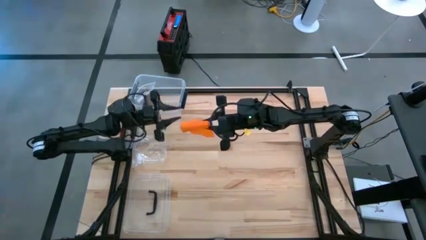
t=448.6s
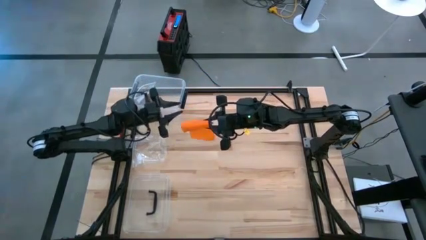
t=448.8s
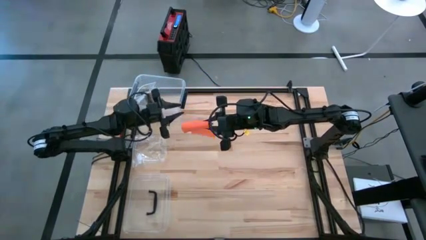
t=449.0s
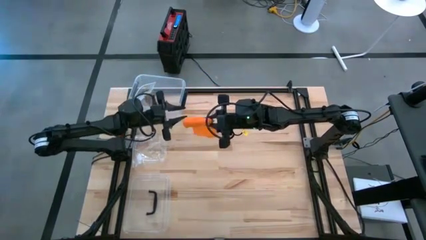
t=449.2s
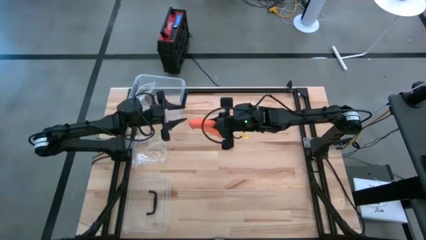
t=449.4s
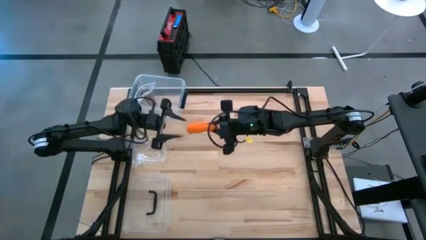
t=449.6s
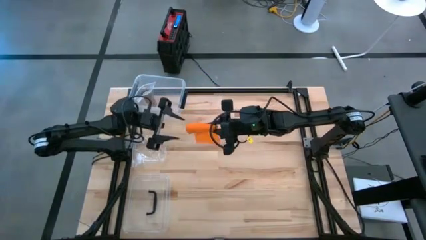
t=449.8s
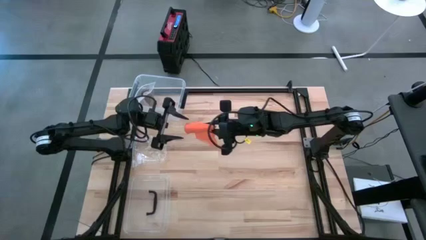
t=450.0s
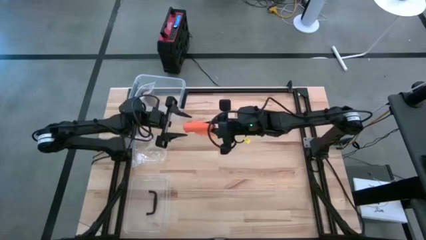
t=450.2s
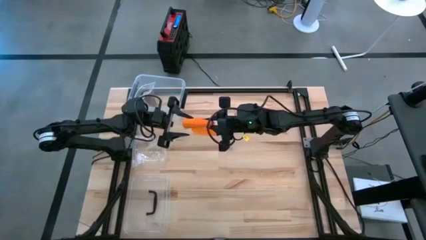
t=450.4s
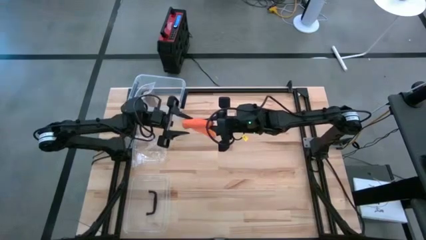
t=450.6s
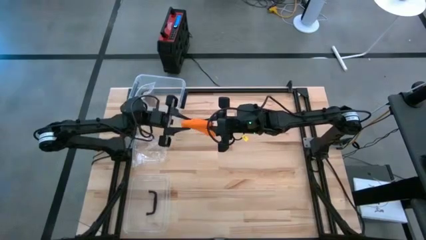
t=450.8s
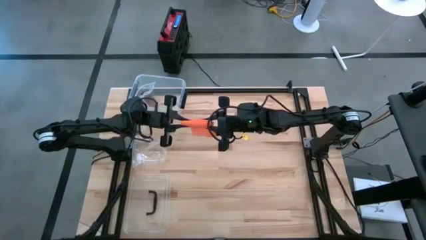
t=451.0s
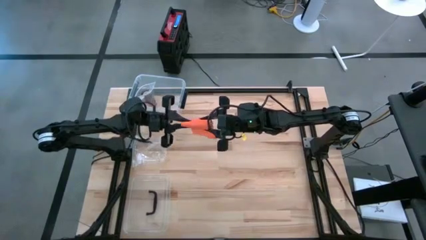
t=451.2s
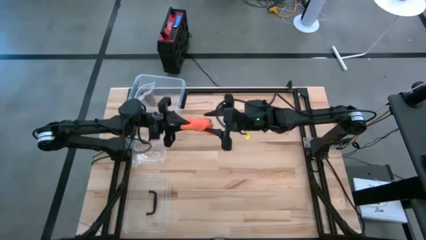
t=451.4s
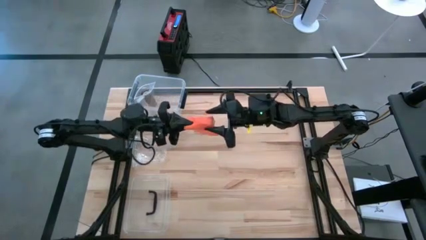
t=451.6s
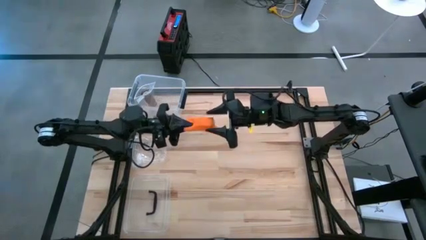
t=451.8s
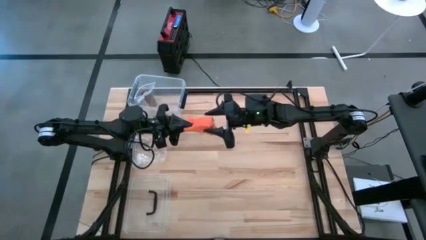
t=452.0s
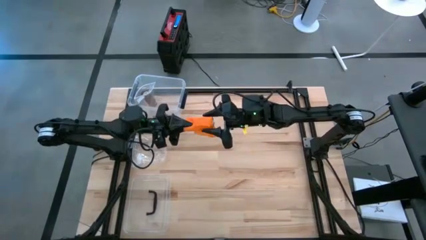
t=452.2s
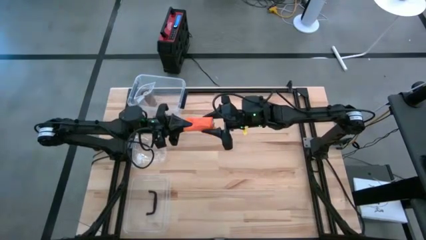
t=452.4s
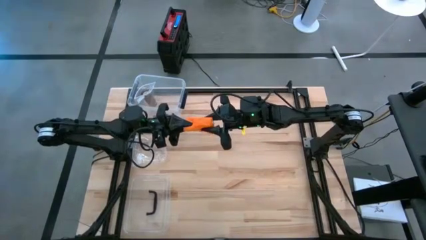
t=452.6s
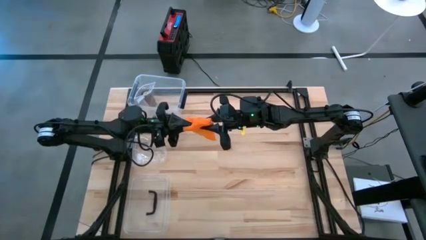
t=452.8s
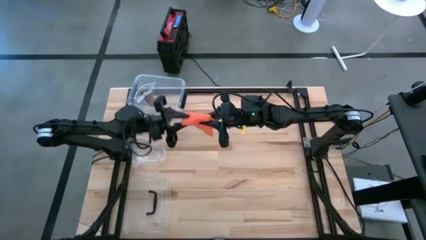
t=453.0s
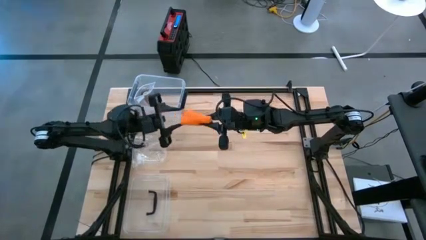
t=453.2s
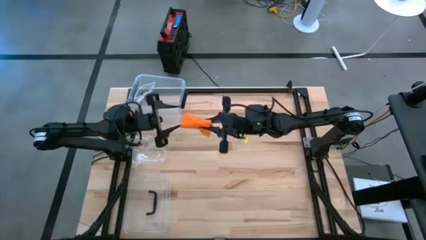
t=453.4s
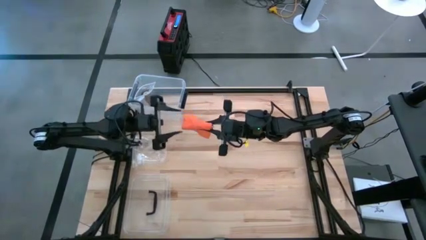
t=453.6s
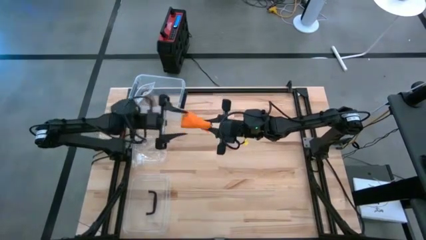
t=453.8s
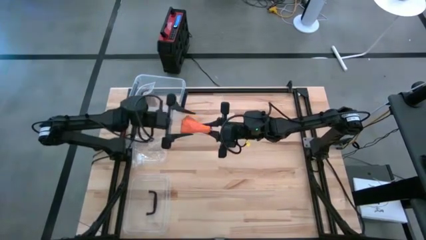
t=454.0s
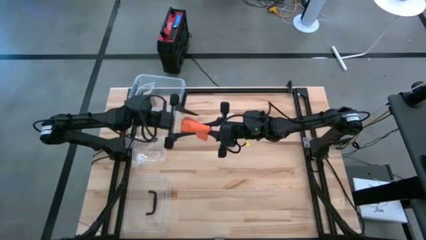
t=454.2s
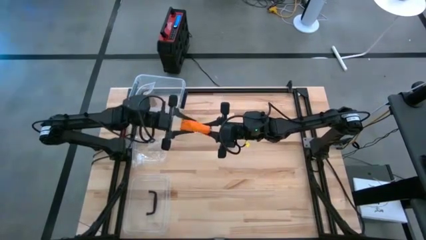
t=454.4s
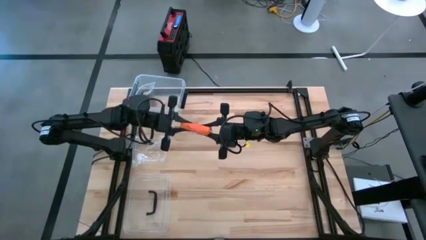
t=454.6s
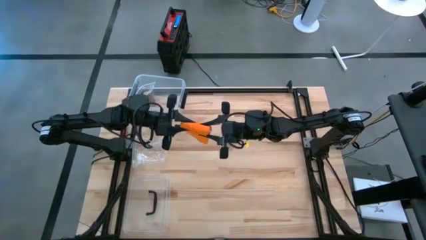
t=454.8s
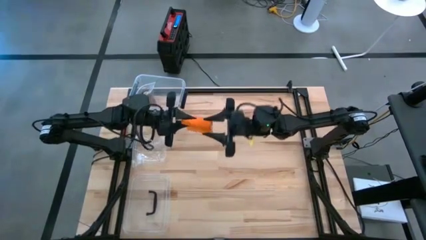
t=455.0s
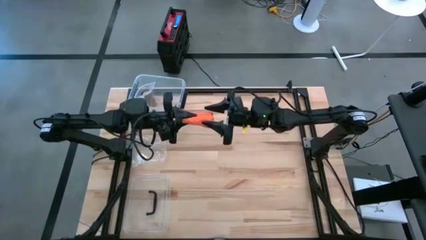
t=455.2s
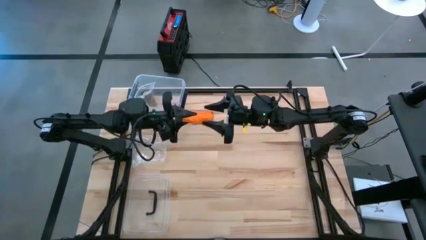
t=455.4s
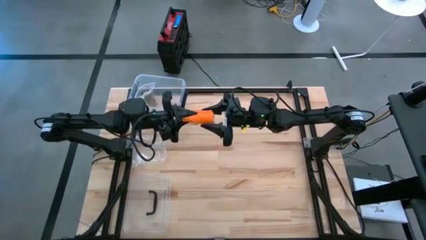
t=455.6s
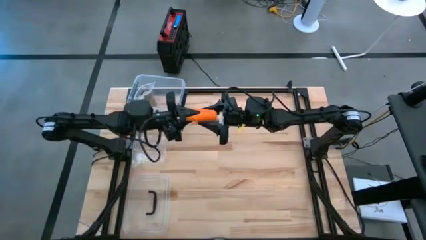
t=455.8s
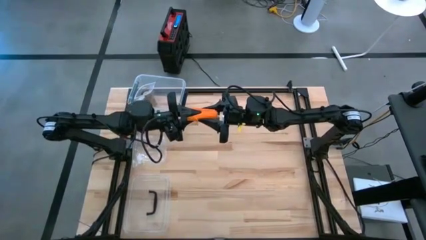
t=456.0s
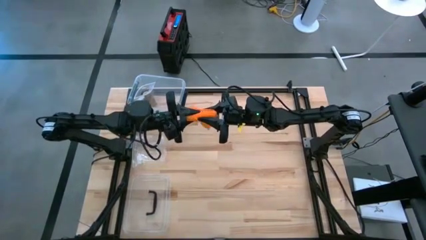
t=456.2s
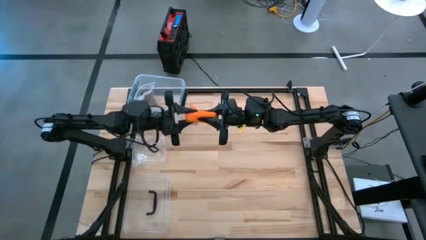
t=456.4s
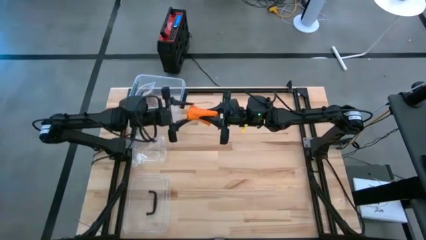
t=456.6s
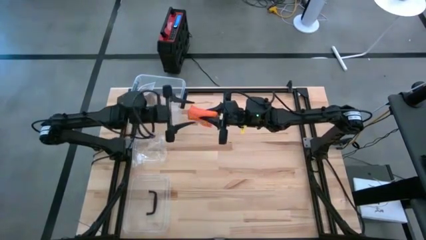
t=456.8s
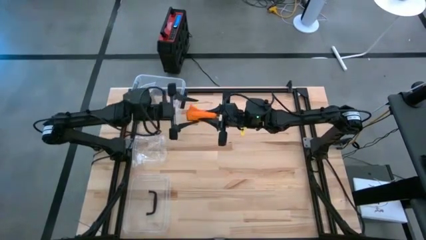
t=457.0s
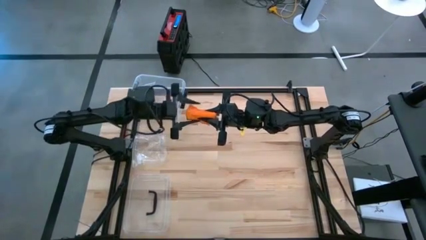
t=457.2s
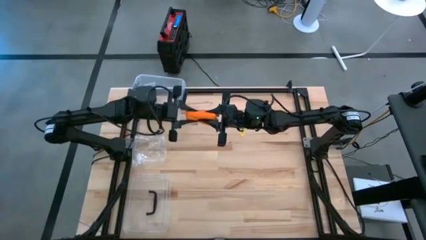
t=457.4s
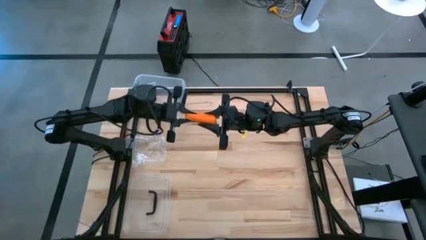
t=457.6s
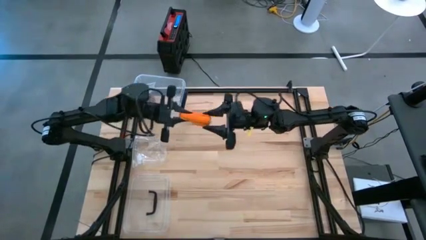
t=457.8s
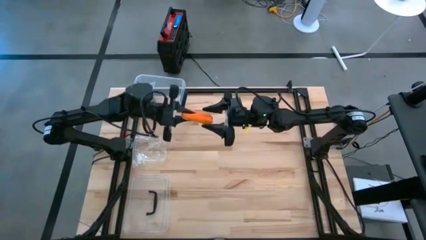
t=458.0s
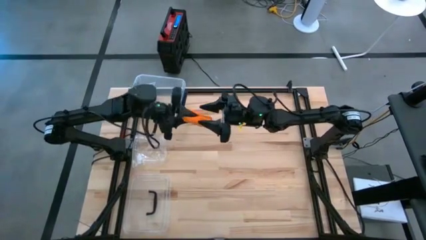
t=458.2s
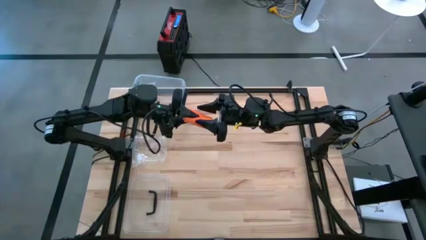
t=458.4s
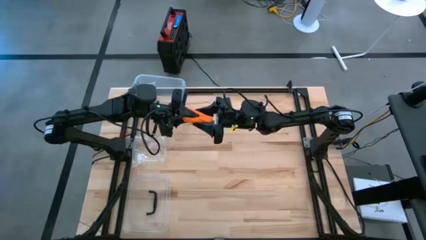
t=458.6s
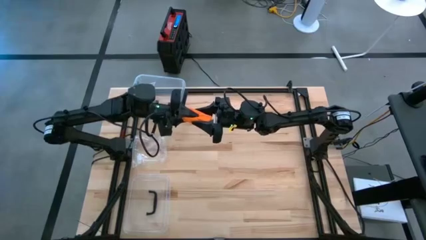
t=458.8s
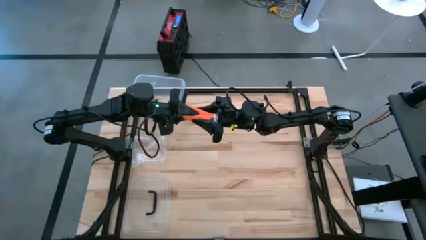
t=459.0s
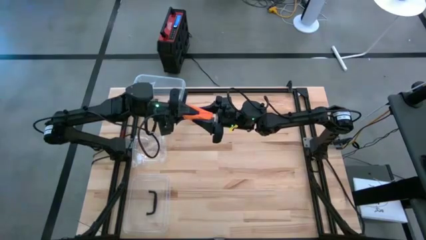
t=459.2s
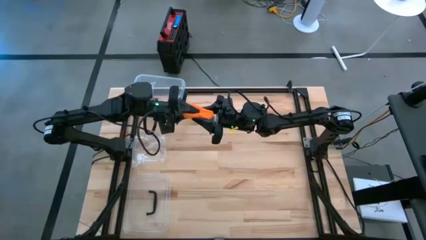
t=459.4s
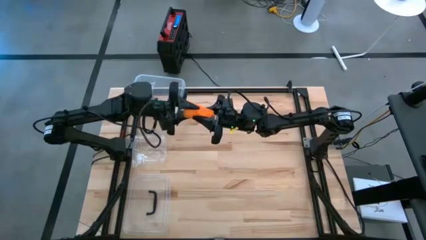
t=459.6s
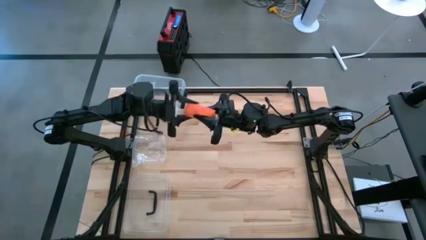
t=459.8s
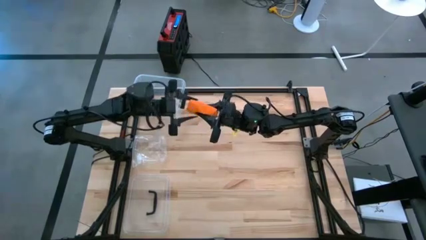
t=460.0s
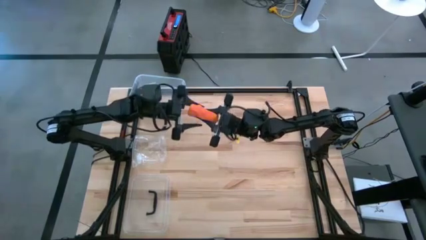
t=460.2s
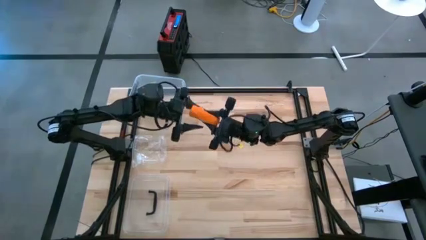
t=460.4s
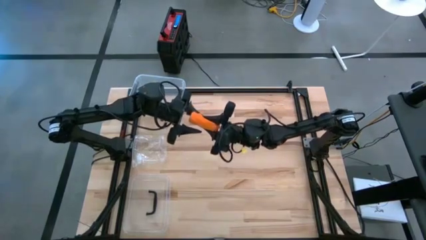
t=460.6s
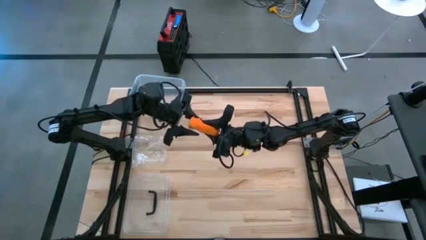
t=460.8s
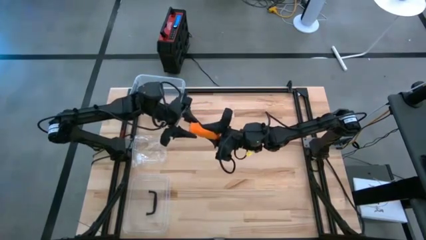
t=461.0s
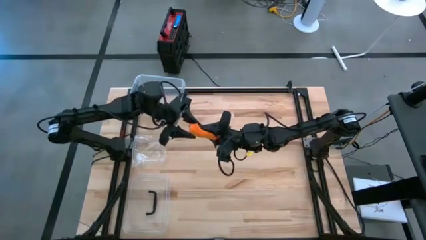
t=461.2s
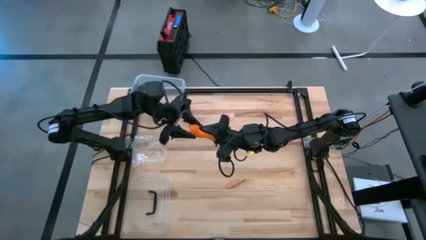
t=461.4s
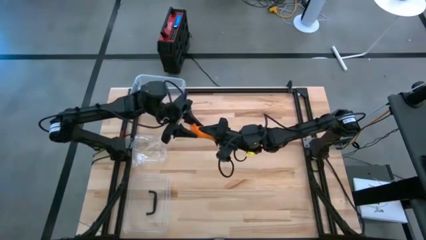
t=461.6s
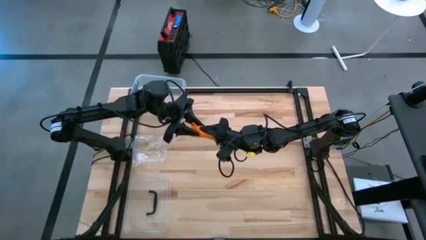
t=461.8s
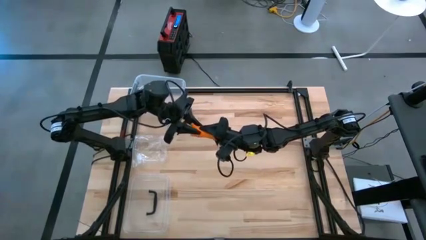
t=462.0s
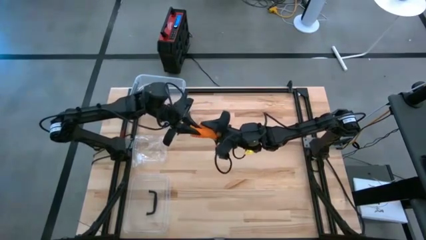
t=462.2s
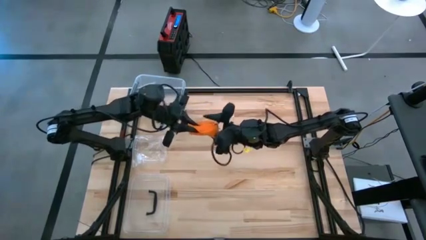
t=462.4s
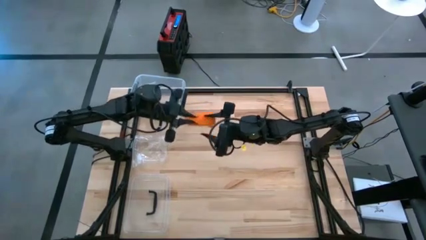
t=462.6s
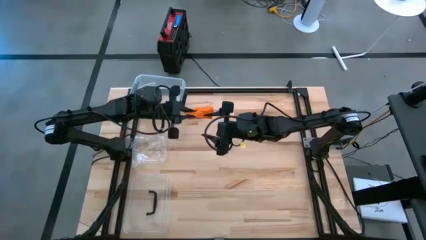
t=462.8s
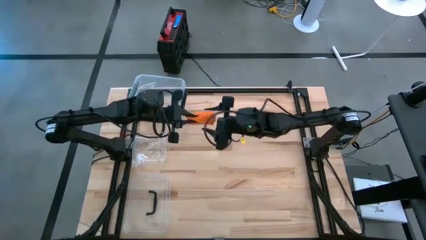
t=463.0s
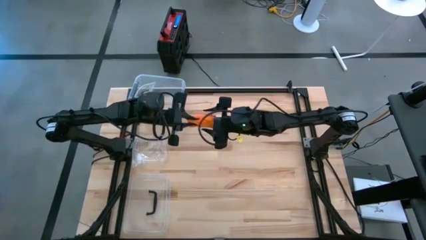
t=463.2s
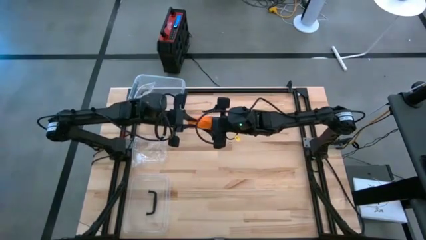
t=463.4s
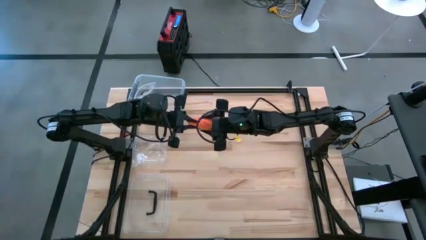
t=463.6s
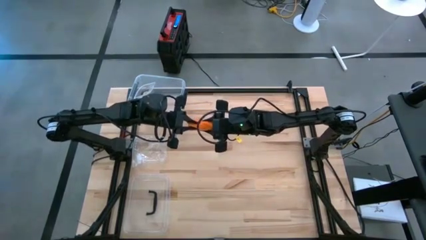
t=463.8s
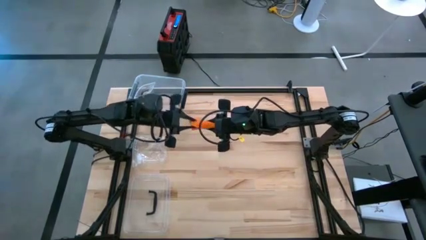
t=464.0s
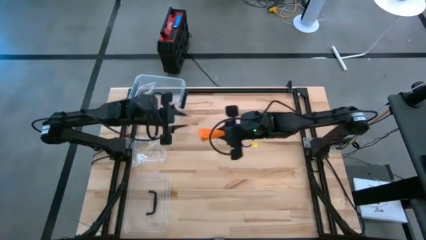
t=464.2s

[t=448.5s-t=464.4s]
Task: Roll bandage
Roll the orange bandage
